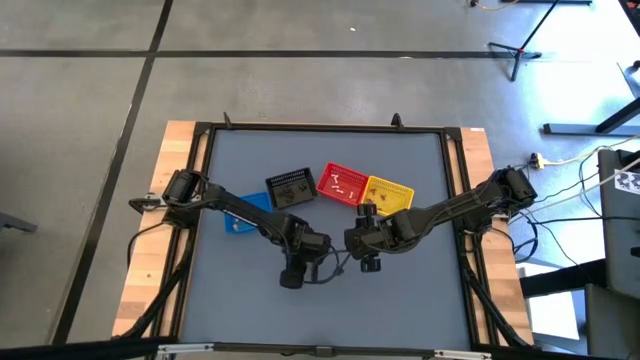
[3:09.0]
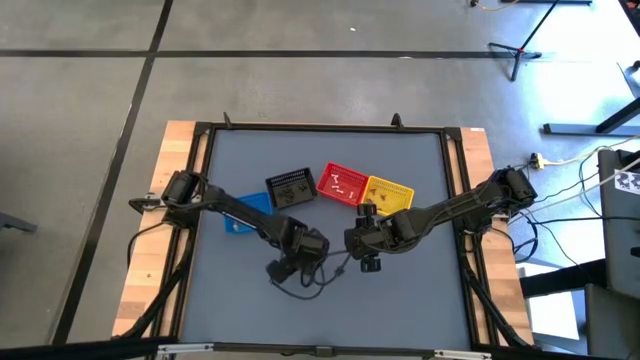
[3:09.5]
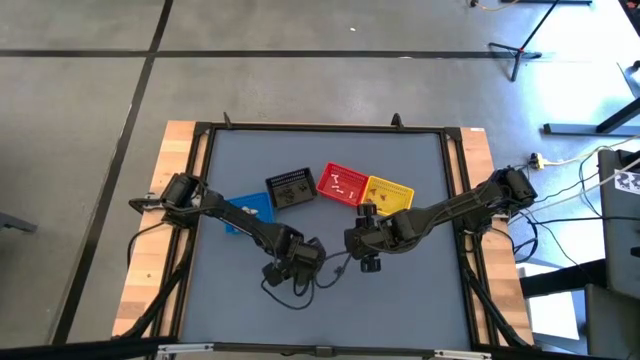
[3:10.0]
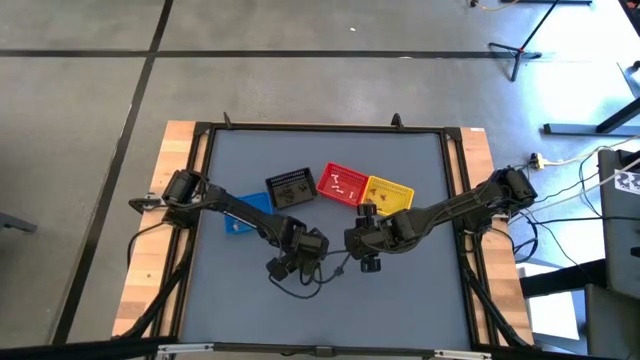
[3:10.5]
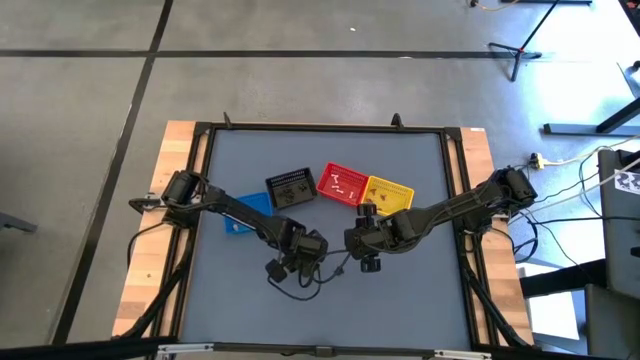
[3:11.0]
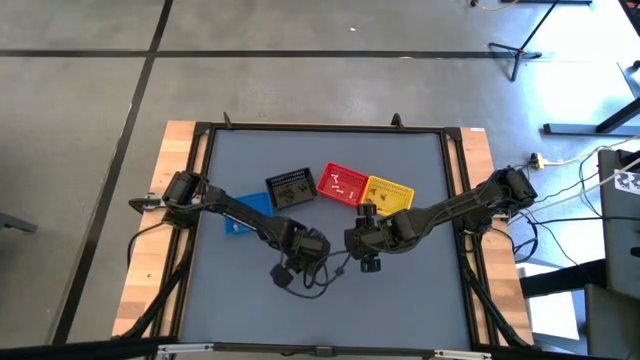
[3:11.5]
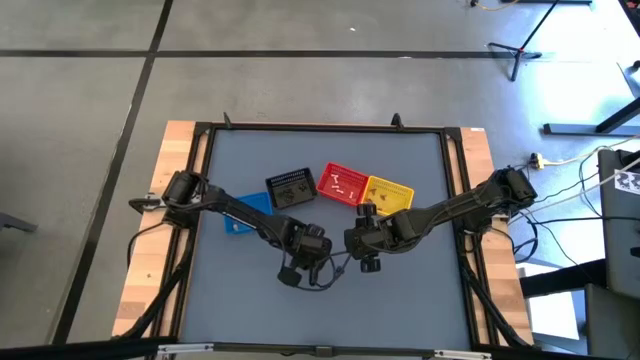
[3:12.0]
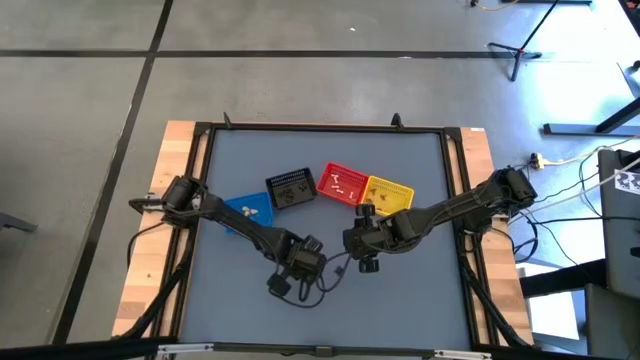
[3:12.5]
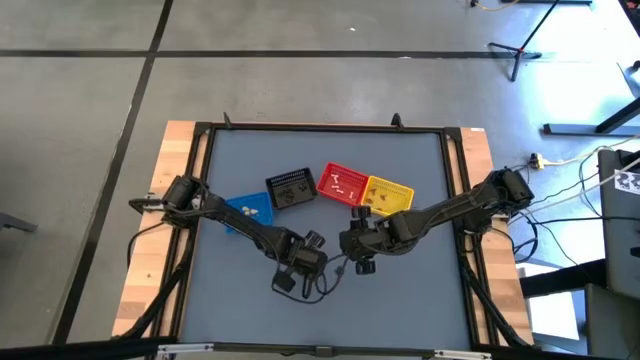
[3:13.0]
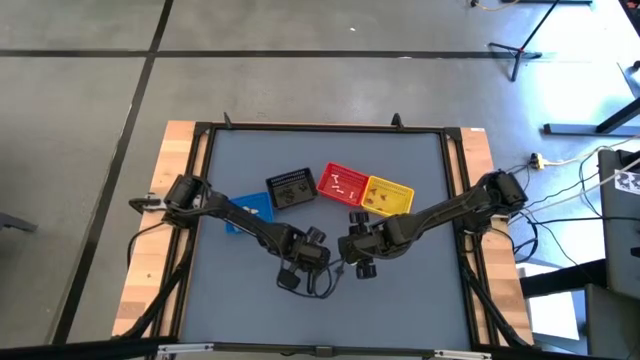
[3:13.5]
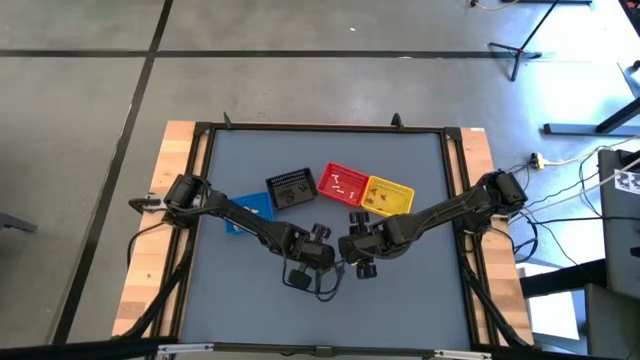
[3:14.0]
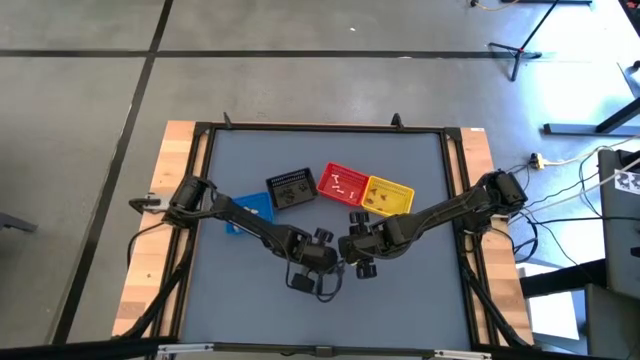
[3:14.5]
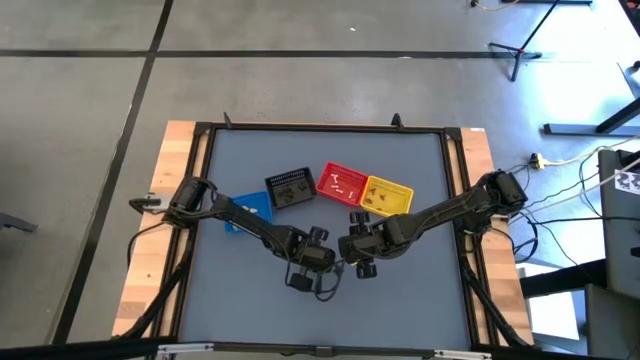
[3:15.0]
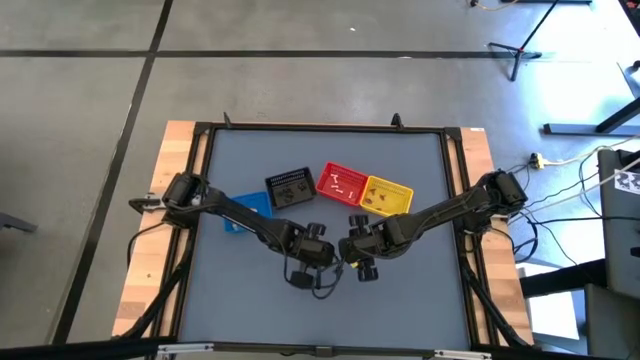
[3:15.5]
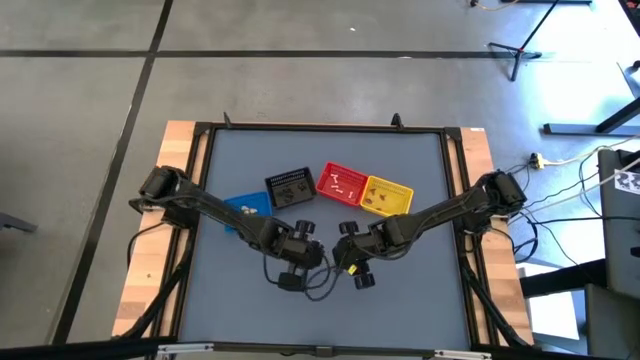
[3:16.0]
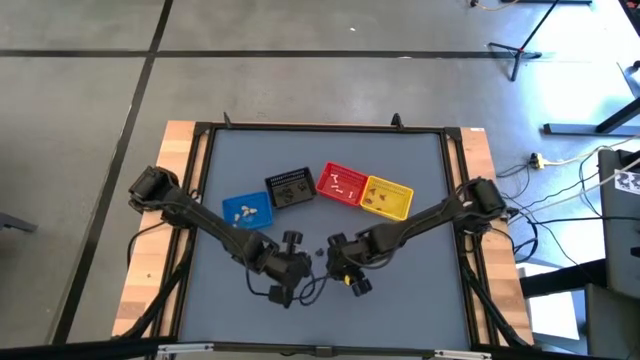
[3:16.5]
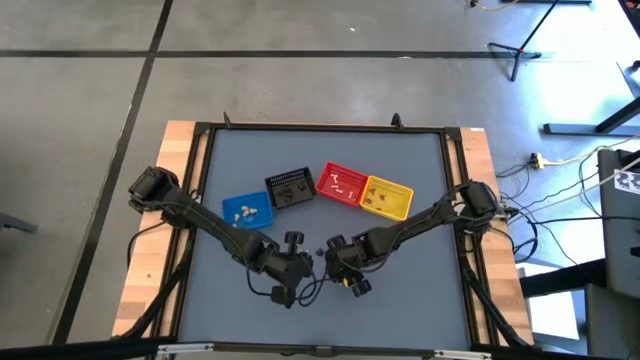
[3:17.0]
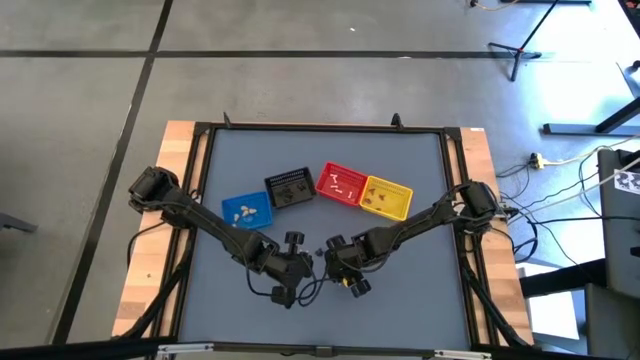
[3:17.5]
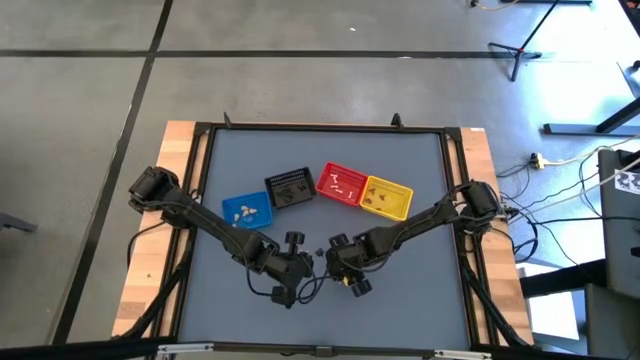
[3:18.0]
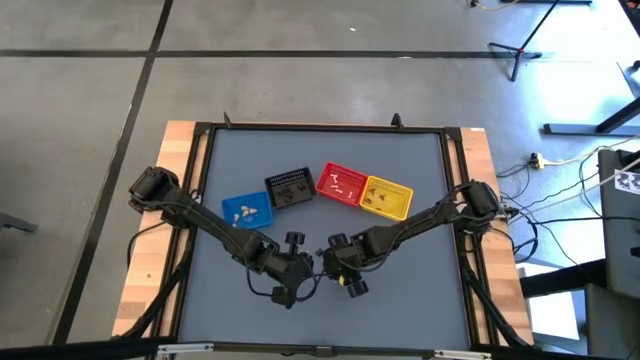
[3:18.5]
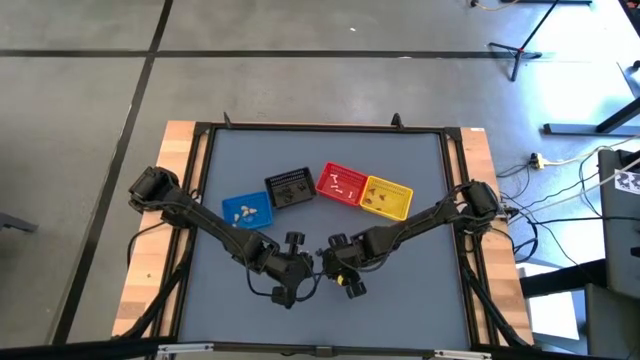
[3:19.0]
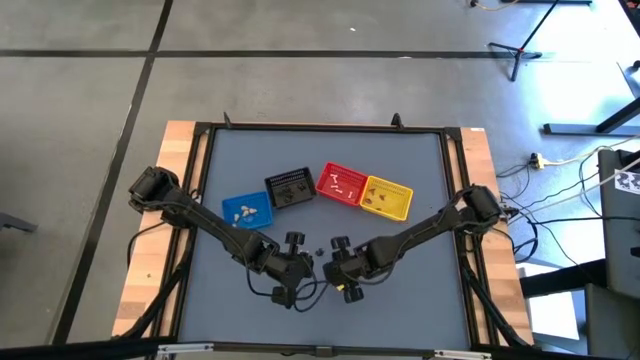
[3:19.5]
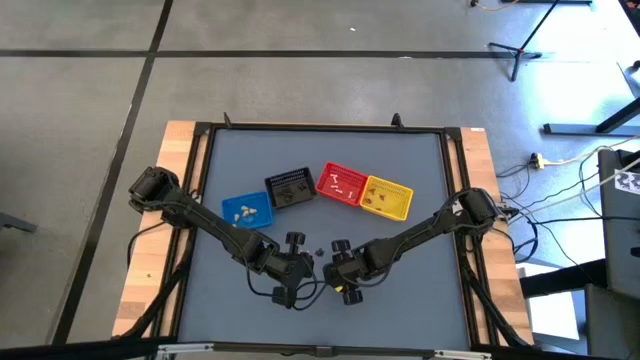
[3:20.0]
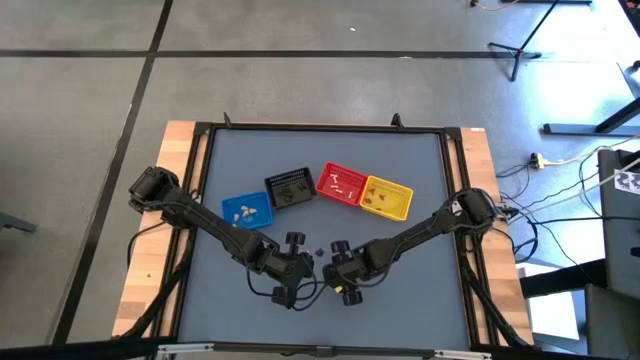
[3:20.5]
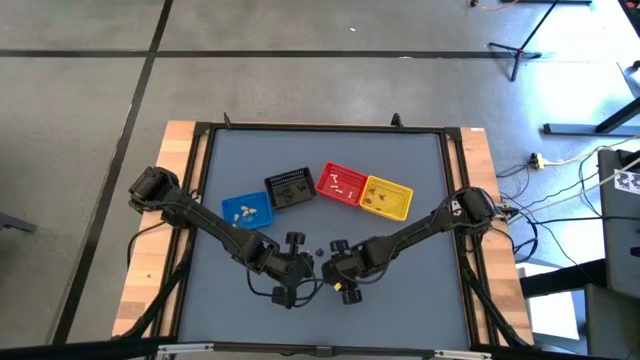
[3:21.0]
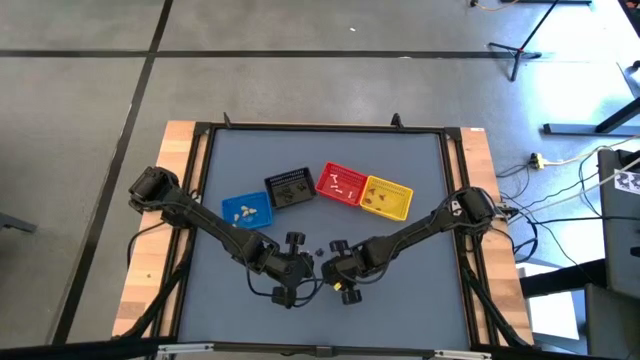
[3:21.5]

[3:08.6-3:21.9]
Task: Sort Halloween decoration
Put the black spider toy into the black bin

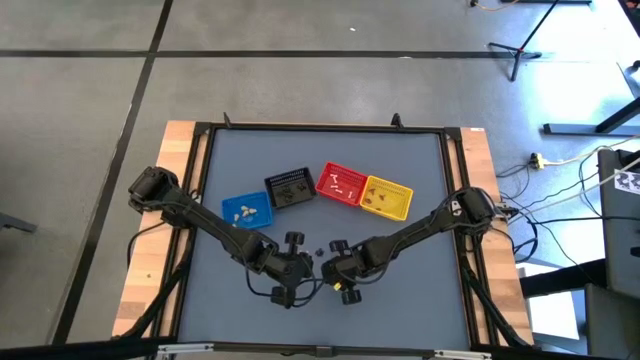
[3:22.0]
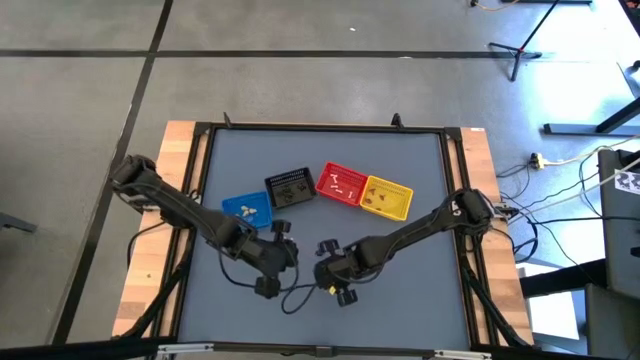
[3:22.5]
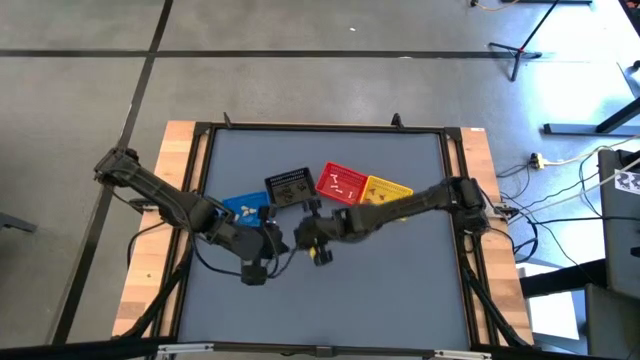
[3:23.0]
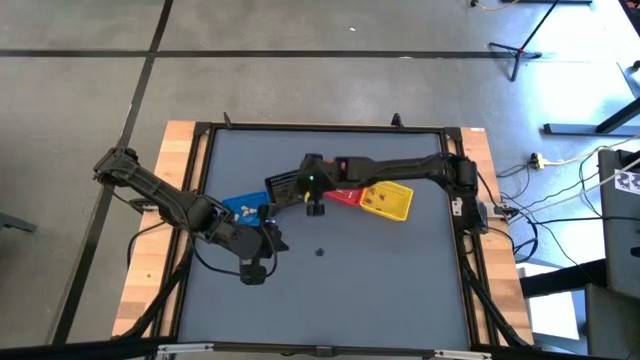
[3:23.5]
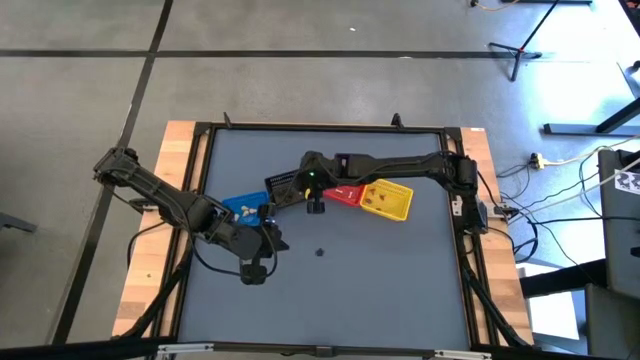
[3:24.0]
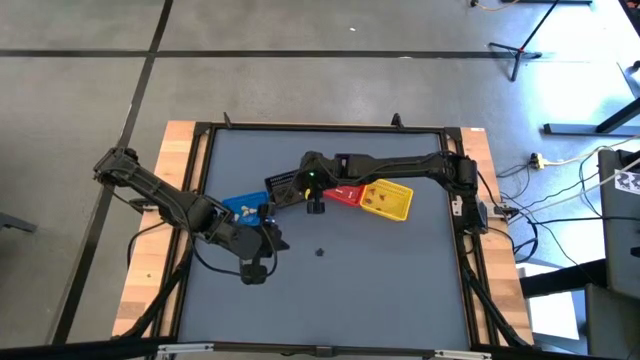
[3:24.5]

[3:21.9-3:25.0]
Put the black spider toy into the black bin

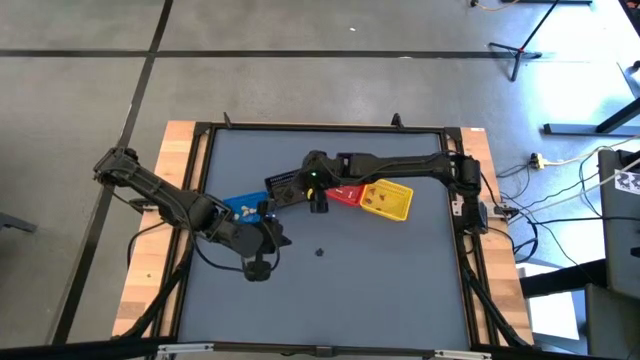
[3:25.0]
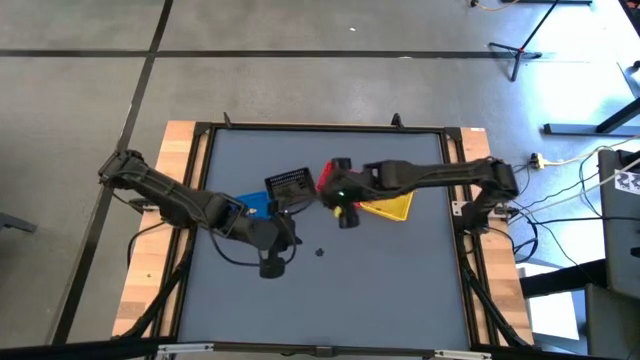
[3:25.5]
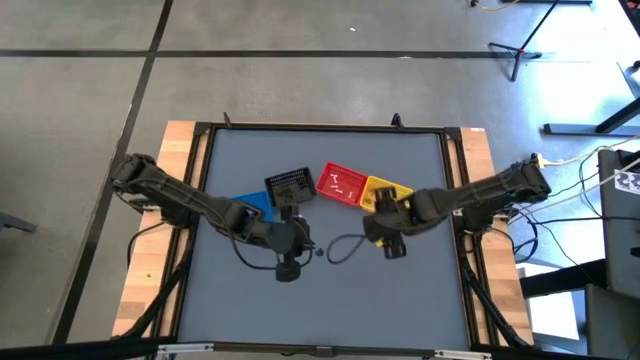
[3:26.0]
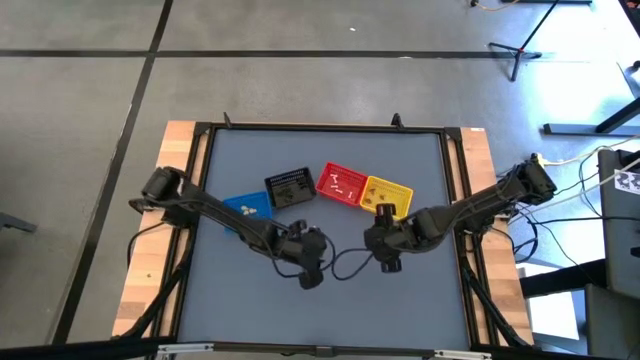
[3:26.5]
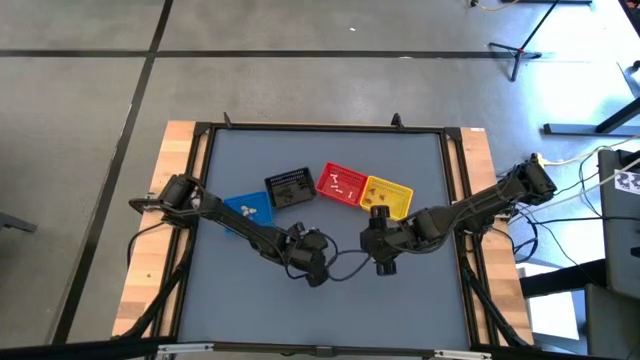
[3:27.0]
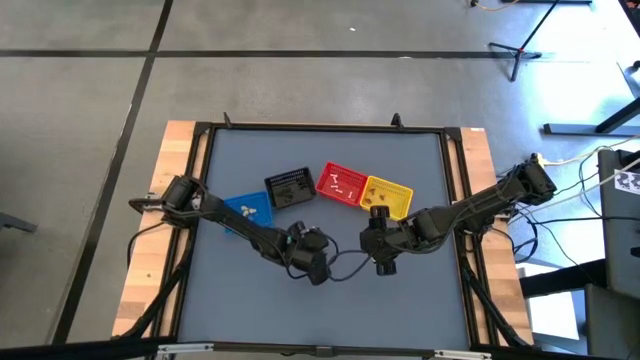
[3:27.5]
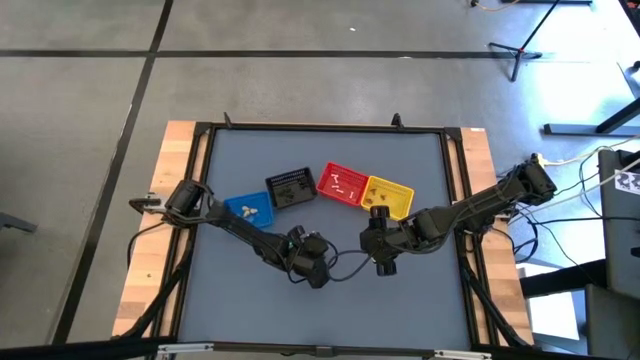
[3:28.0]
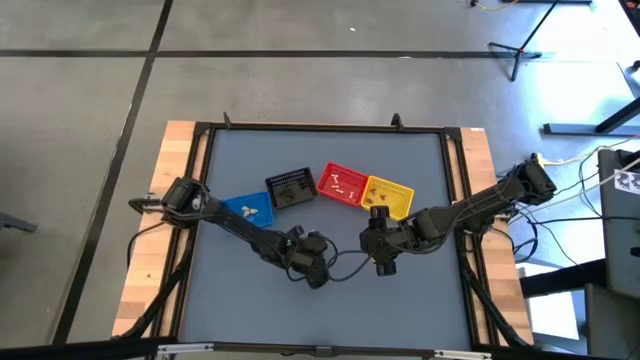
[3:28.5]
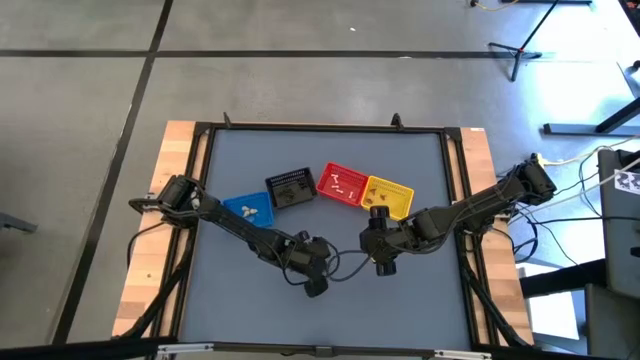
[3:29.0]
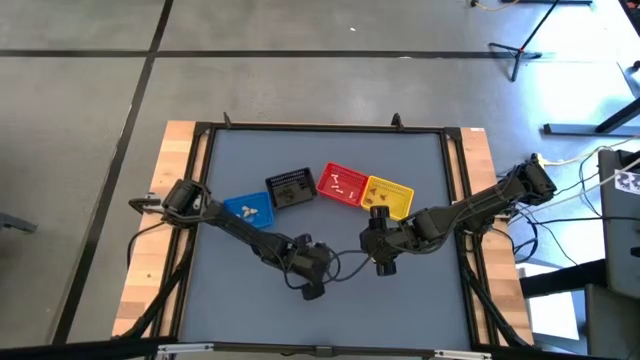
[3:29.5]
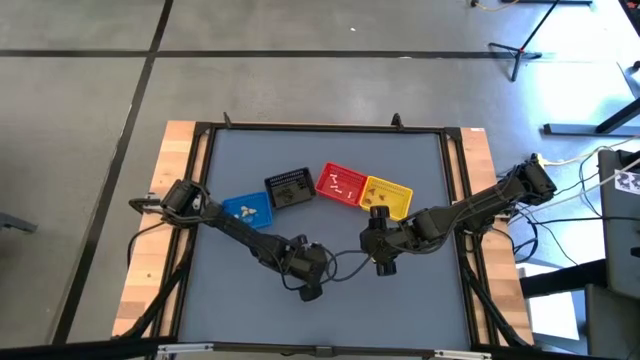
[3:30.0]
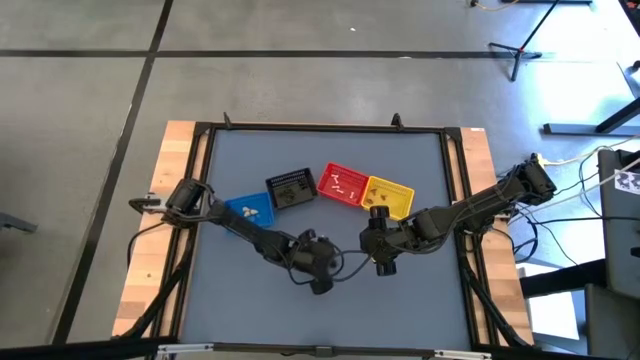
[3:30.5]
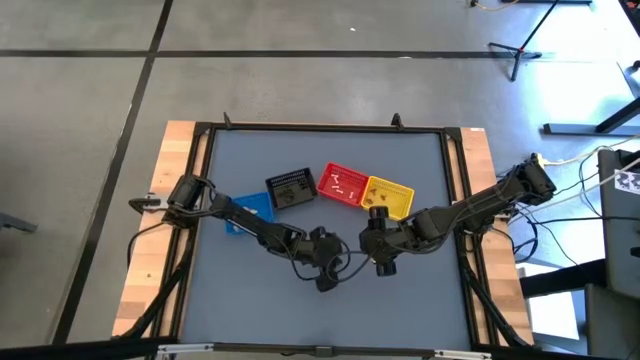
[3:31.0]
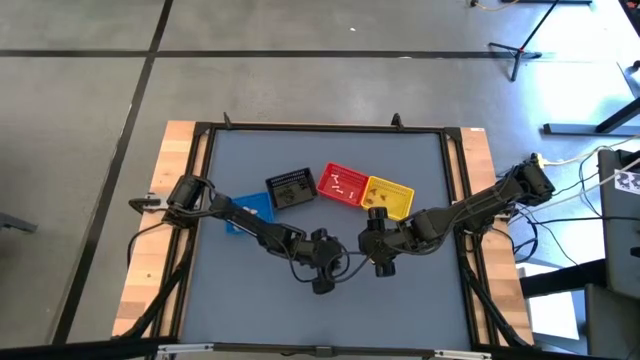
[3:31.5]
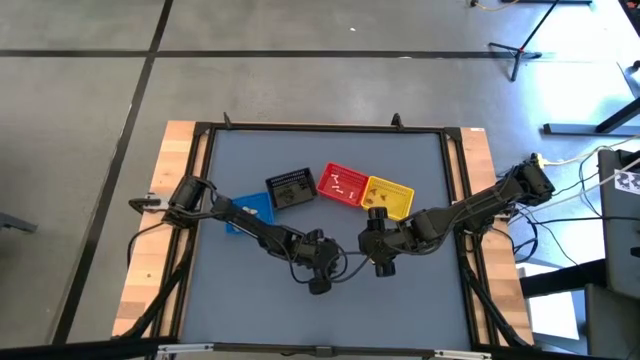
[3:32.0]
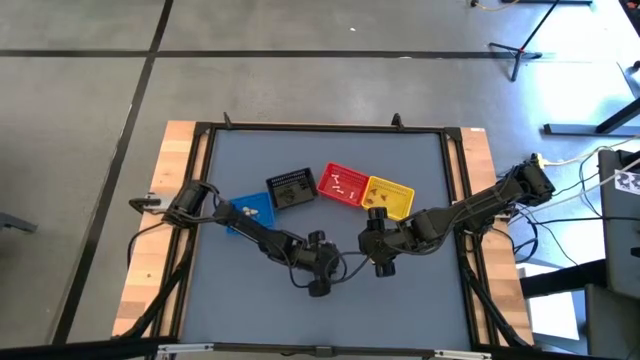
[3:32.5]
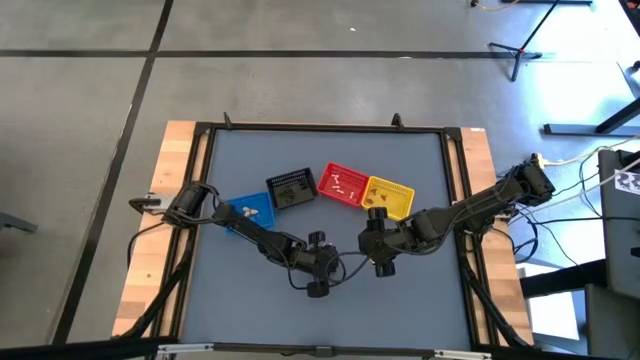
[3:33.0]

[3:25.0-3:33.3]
Put the black spider toy into the black bin
